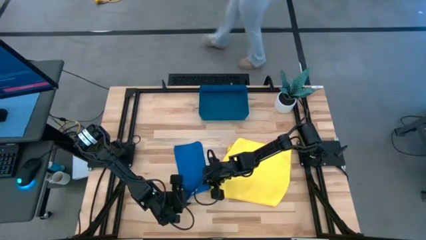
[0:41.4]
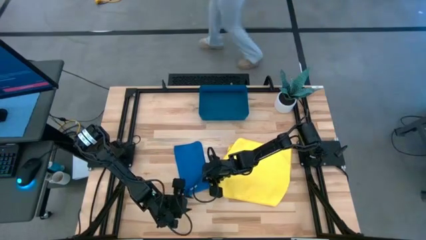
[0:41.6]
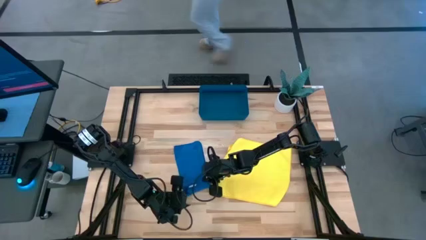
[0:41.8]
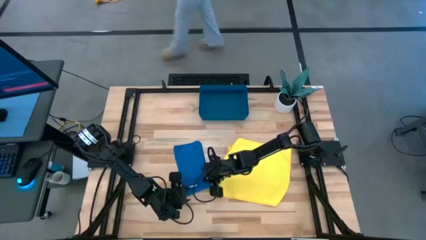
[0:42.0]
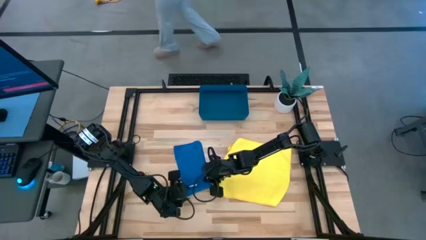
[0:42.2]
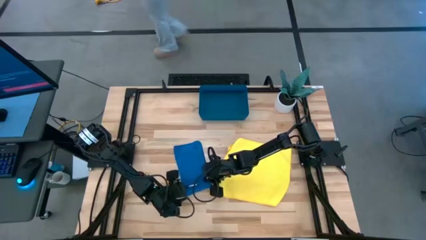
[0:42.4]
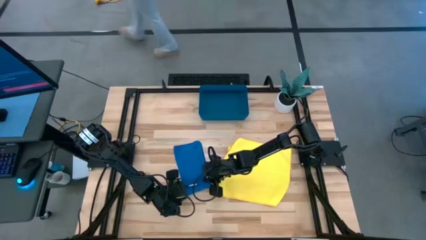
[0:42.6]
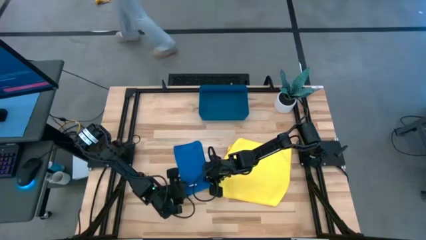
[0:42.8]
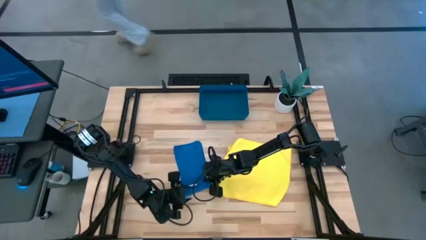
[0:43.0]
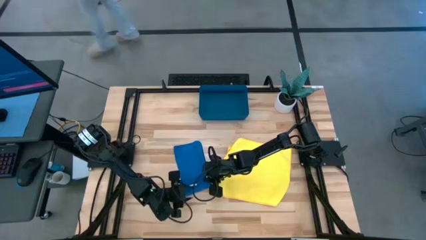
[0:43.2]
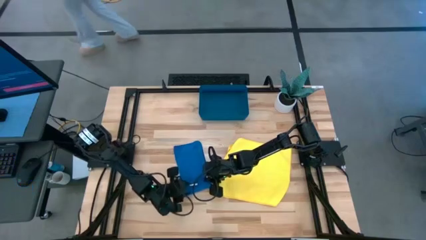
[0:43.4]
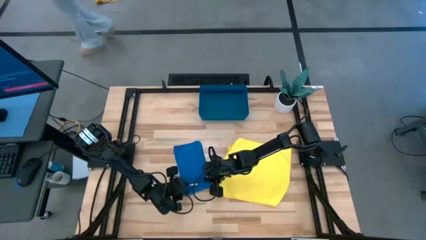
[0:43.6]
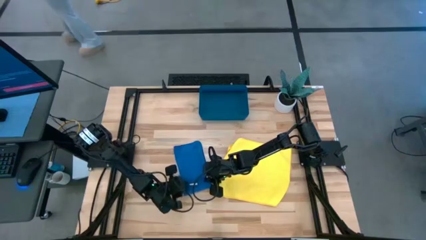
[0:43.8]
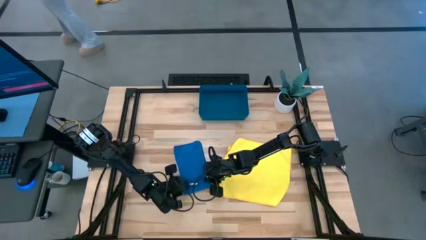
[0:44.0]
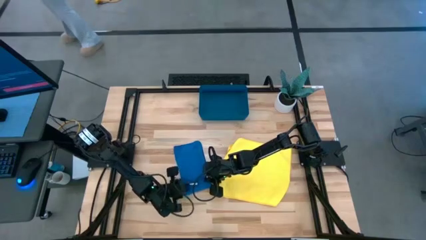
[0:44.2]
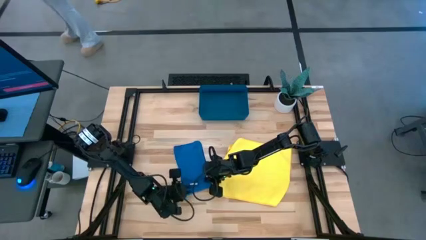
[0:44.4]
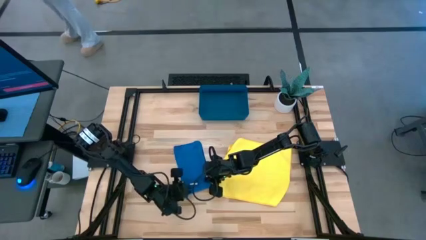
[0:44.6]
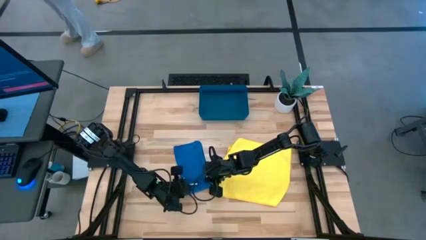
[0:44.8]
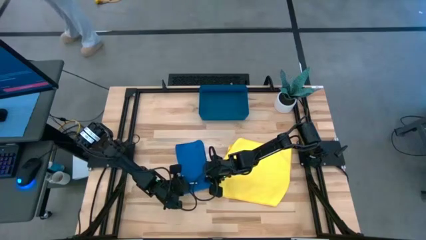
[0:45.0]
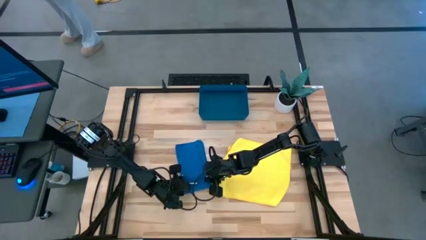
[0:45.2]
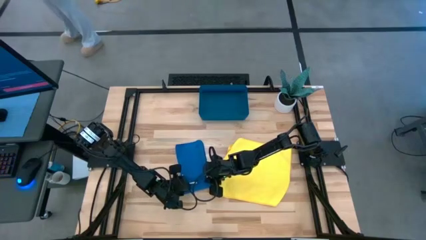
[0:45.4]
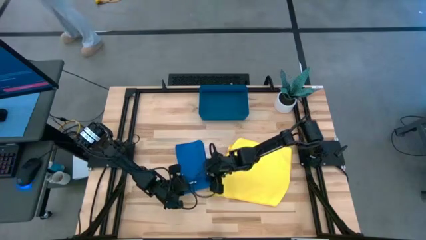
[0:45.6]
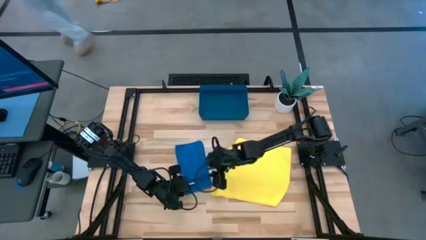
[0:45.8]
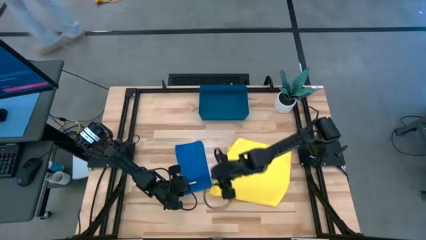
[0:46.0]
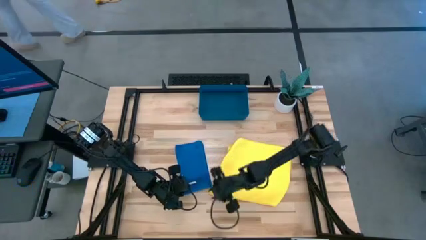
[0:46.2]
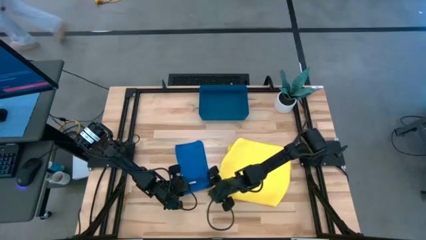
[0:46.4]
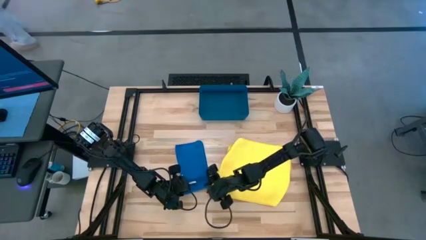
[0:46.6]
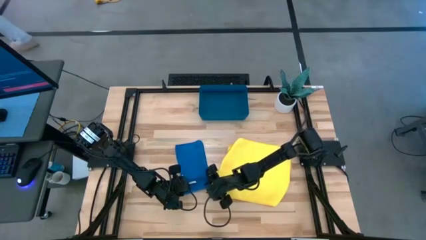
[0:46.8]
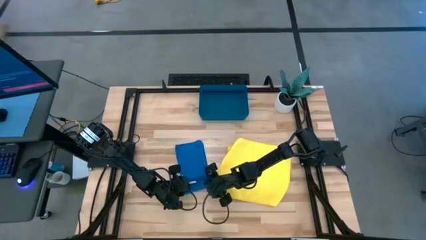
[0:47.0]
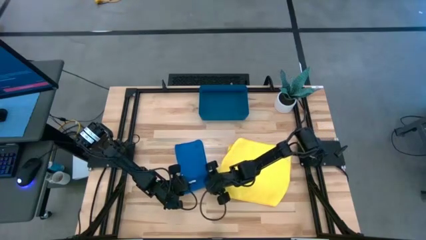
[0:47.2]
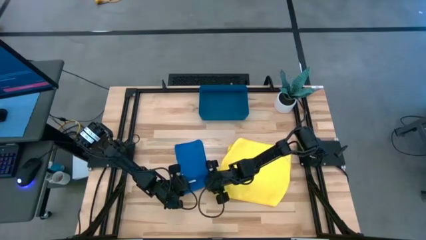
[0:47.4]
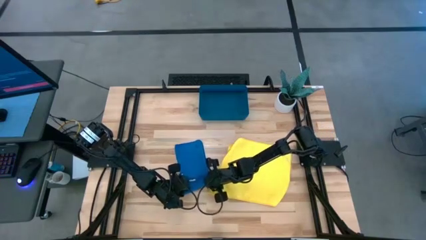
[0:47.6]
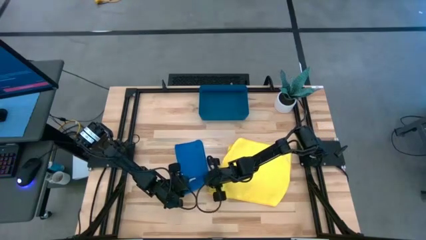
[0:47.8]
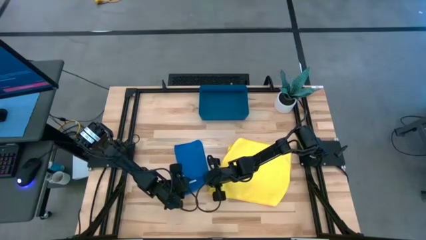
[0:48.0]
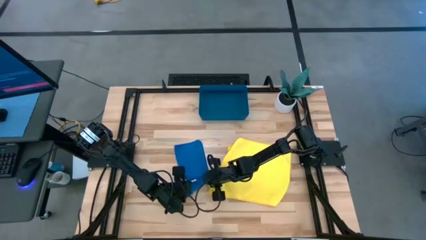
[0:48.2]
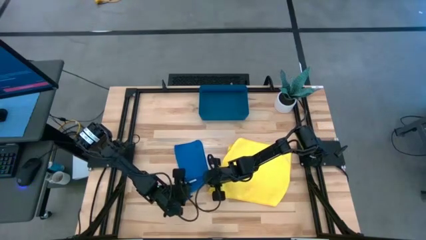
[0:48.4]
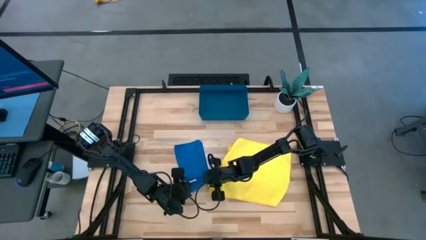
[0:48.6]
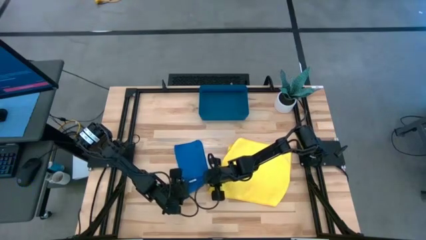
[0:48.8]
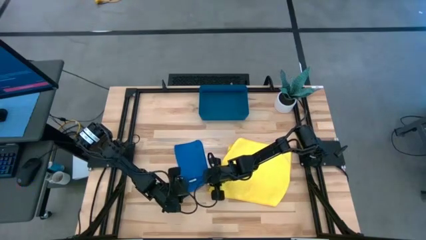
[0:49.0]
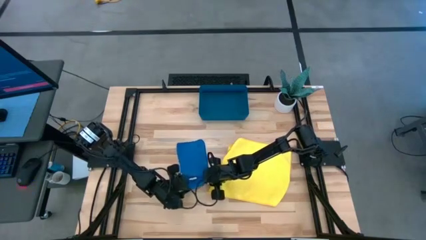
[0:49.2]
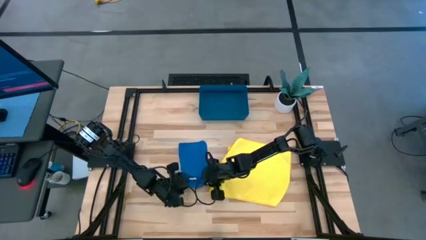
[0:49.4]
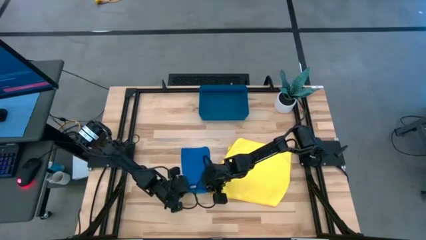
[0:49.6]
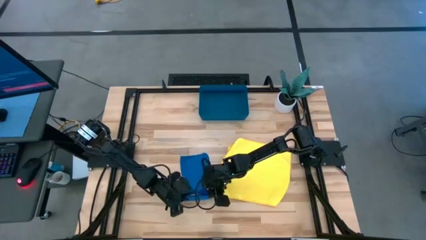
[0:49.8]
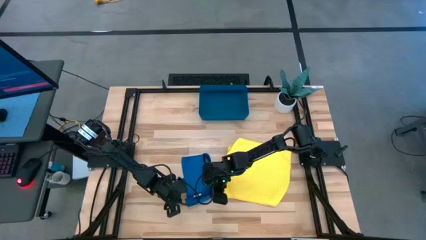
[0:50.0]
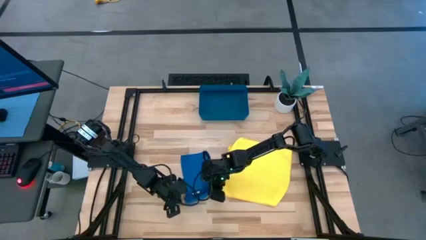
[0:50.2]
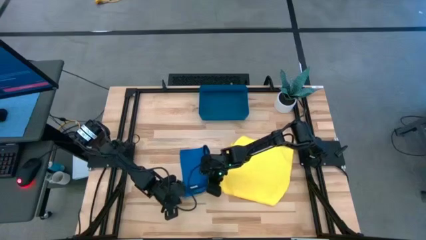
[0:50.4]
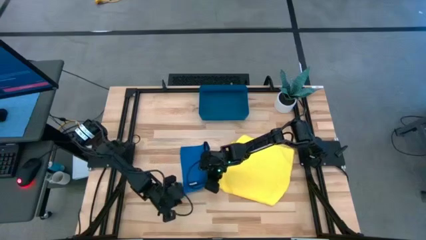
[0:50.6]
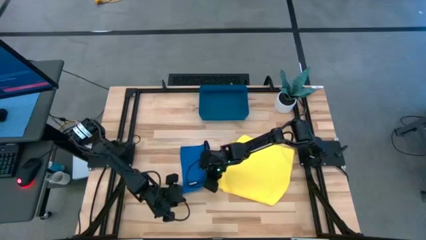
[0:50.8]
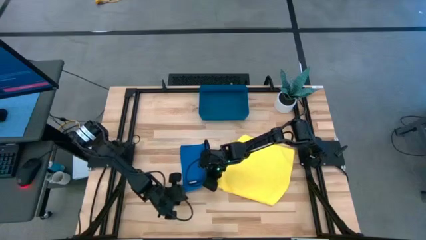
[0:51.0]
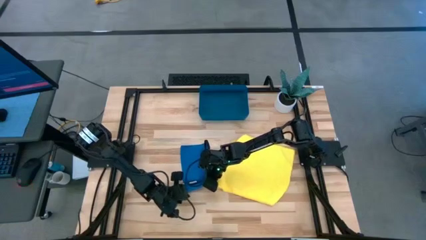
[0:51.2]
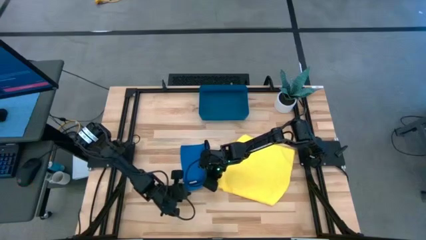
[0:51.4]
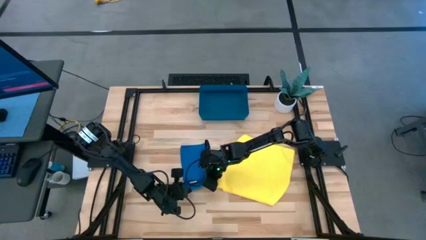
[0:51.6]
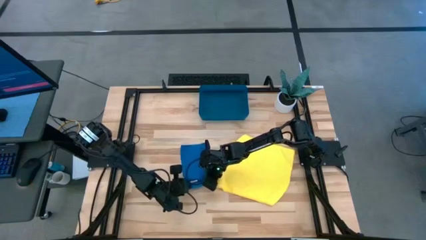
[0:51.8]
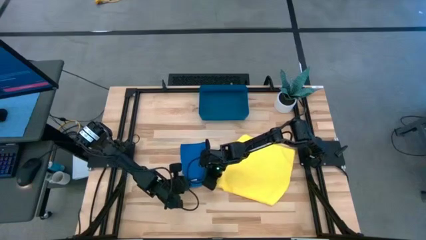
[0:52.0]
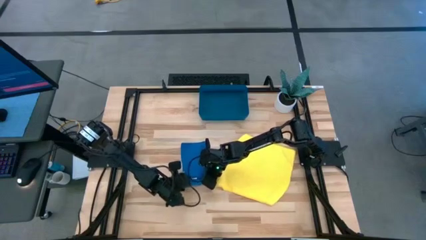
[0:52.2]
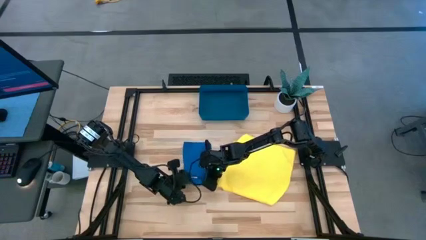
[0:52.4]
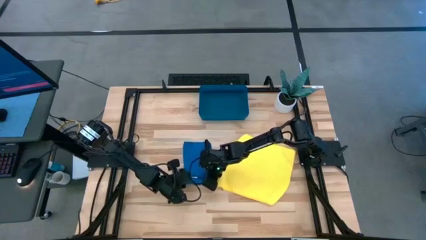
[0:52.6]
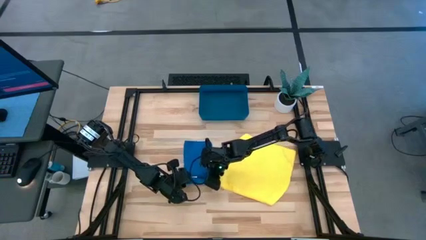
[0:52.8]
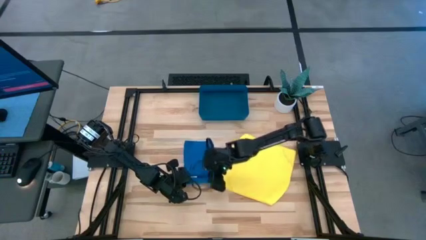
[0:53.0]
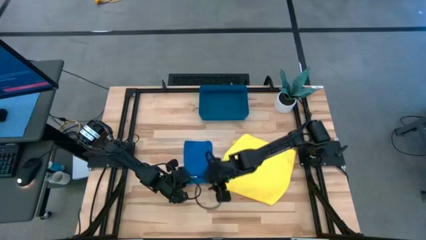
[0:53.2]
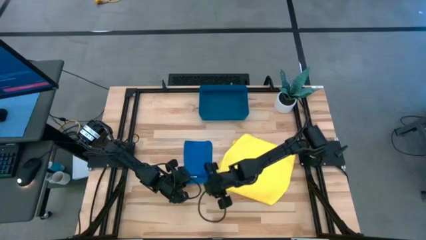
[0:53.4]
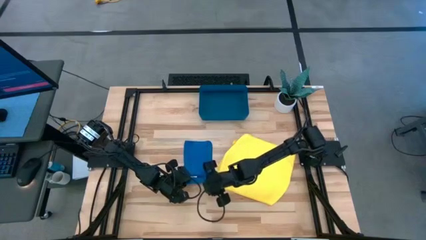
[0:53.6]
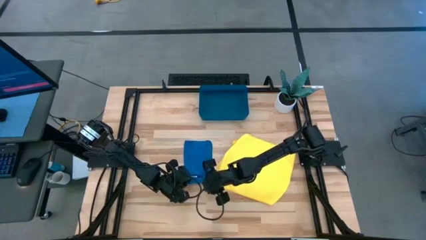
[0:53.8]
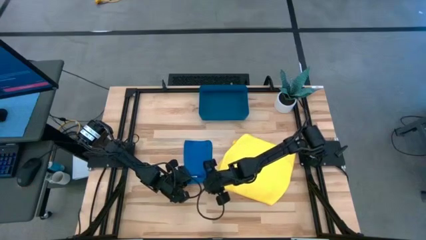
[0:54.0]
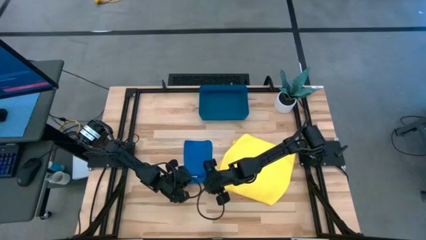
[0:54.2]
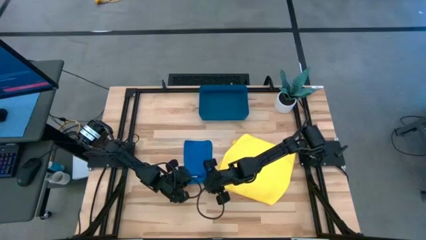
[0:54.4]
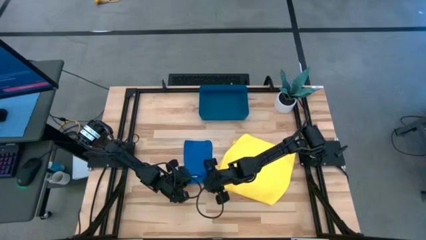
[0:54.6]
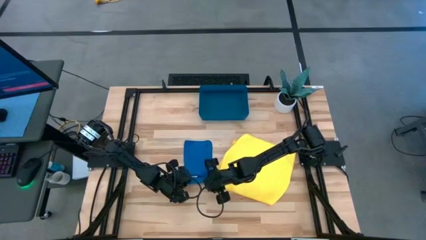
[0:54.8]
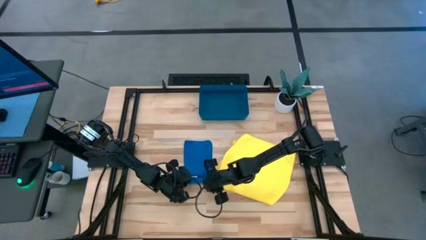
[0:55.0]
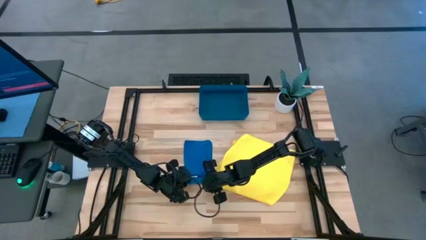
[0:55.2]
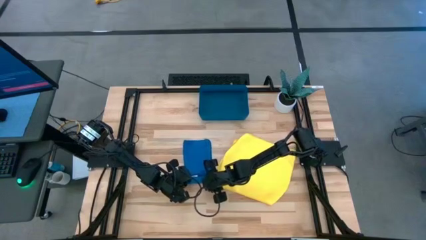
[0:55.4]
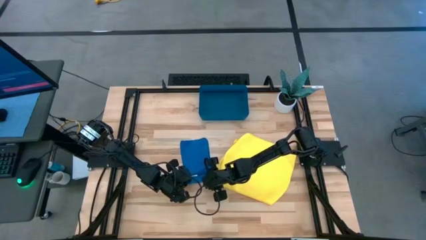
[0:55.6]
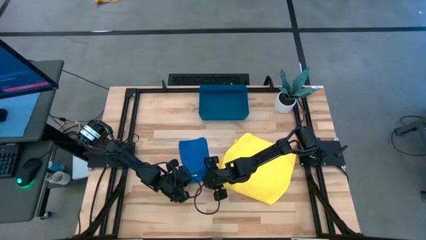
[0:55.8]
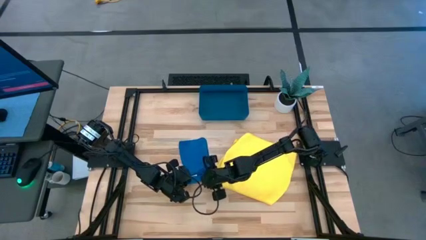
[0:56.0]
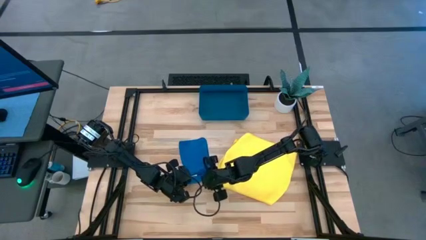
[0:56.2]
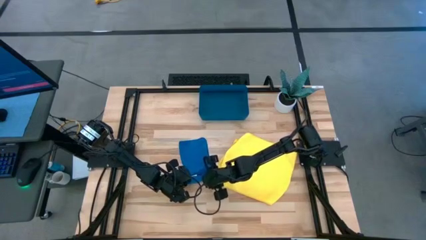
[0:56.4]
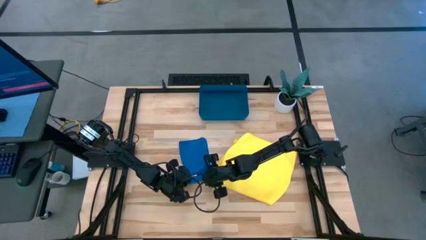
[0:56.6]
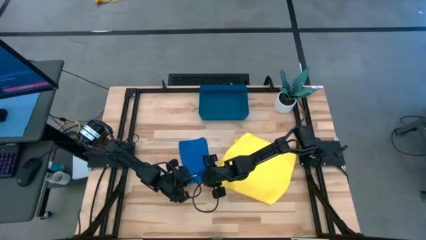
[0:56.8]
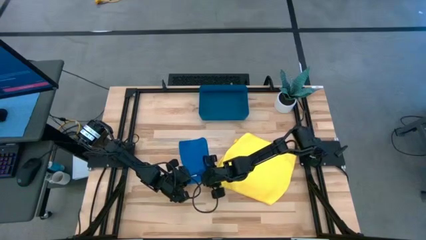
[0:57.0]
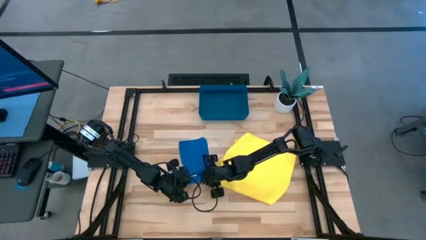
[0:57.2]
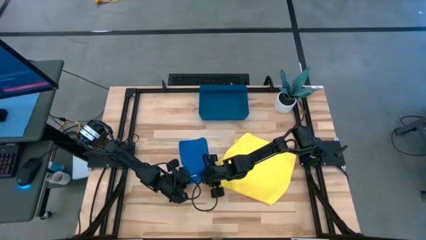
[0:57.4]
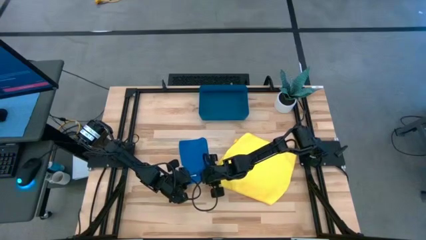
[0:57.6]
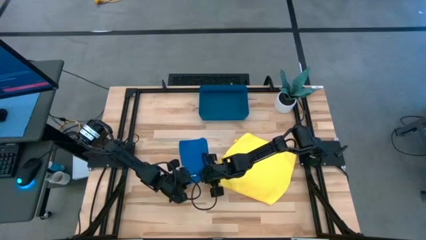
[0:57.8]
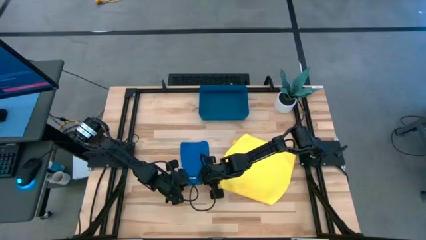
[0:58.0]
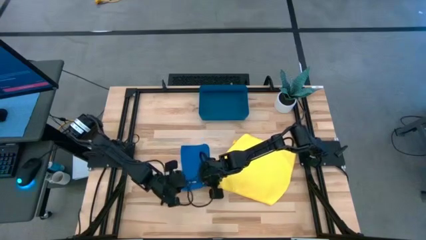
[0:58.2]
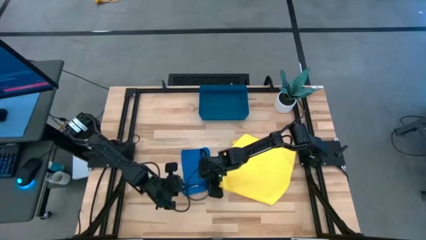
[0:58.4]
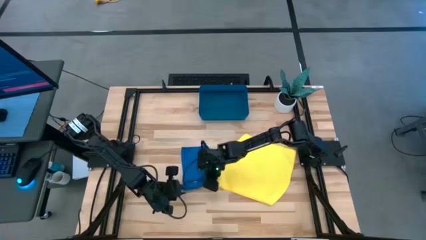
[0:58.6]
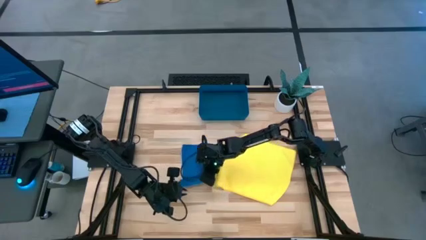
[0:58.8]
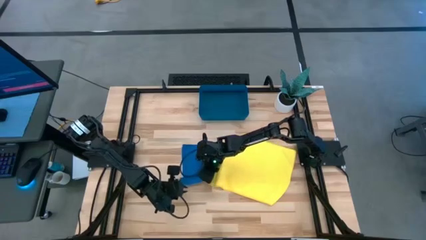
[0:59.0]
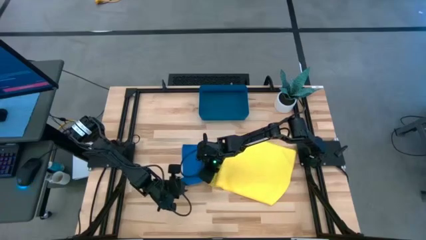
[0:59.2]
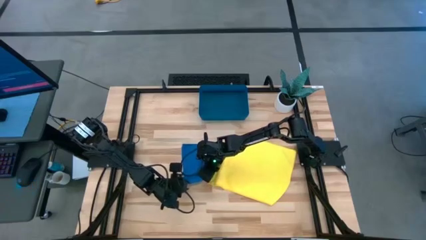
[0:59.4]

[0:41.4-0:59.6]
Task: Roll microfiber towels into tight, uniform cylinder then place into a basket
Roll the blue microfiber cloth
